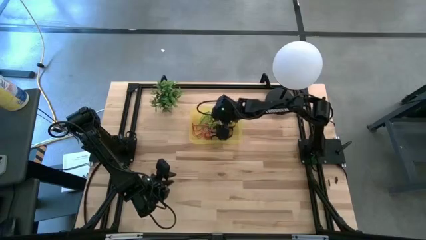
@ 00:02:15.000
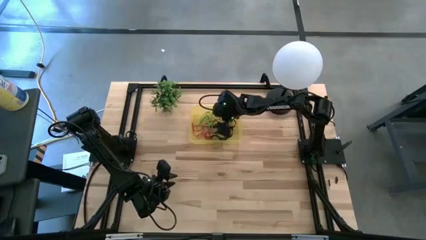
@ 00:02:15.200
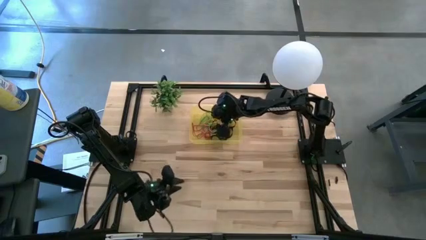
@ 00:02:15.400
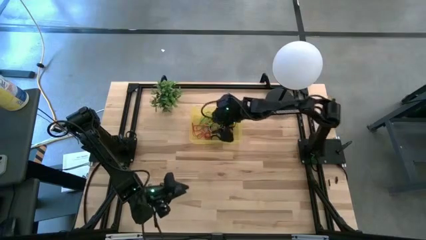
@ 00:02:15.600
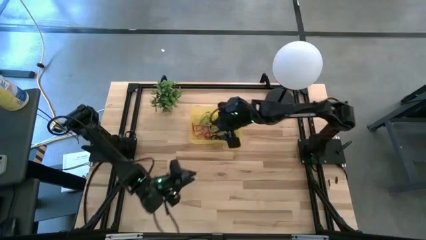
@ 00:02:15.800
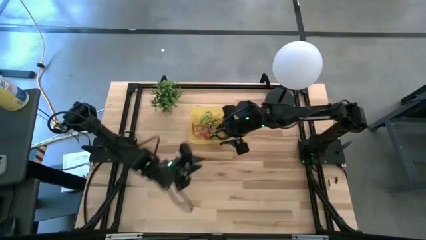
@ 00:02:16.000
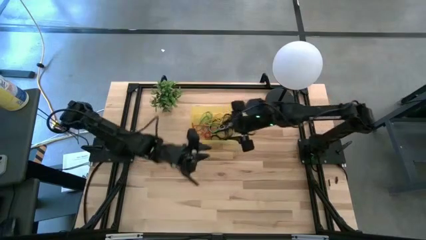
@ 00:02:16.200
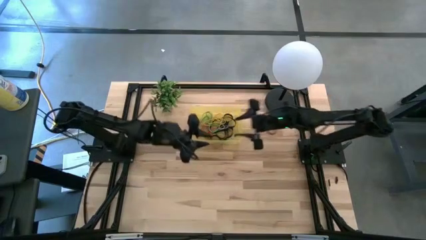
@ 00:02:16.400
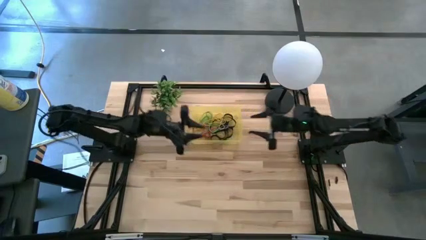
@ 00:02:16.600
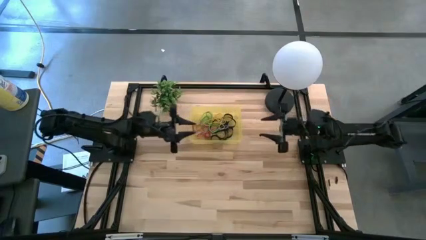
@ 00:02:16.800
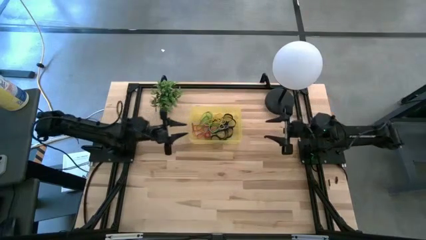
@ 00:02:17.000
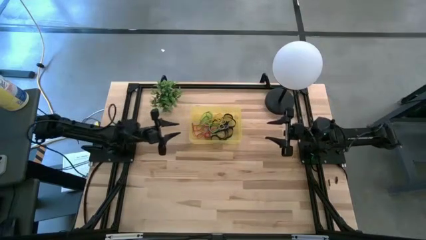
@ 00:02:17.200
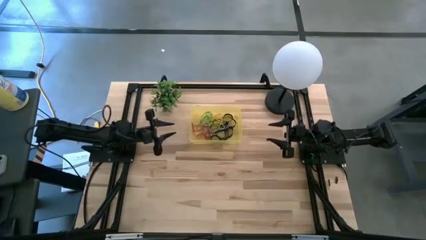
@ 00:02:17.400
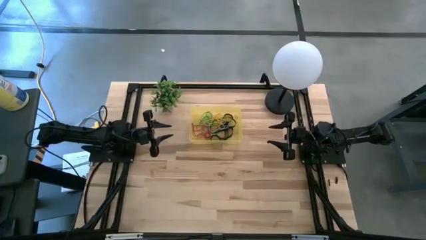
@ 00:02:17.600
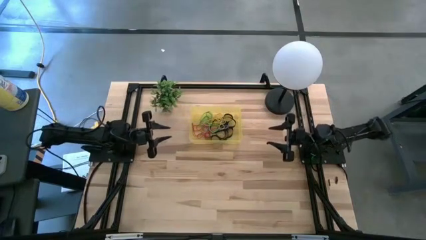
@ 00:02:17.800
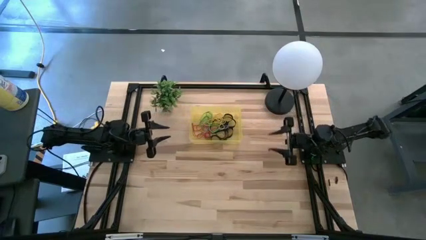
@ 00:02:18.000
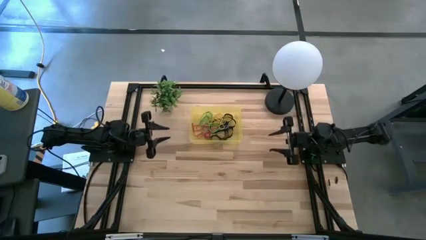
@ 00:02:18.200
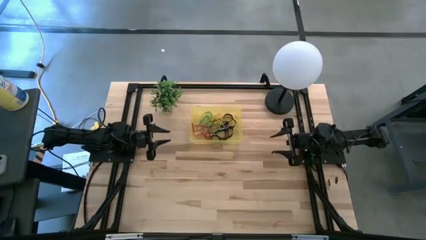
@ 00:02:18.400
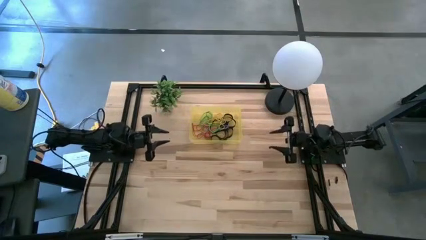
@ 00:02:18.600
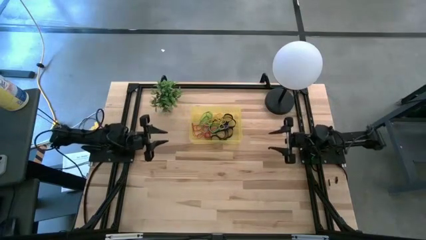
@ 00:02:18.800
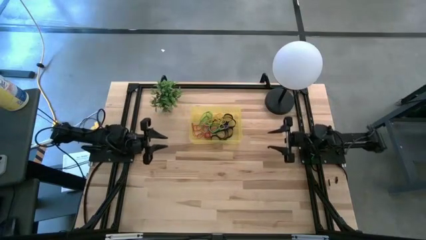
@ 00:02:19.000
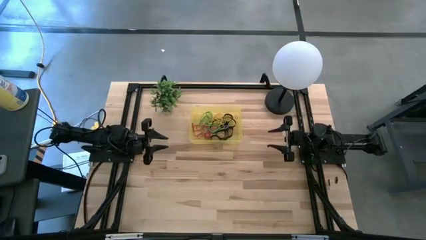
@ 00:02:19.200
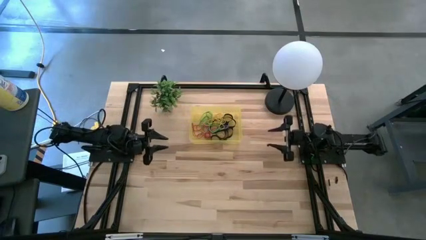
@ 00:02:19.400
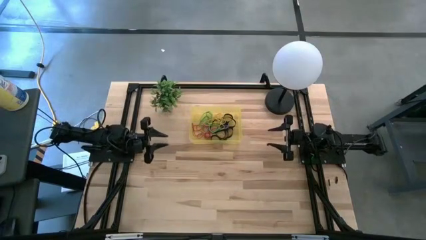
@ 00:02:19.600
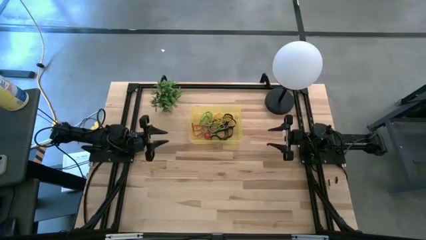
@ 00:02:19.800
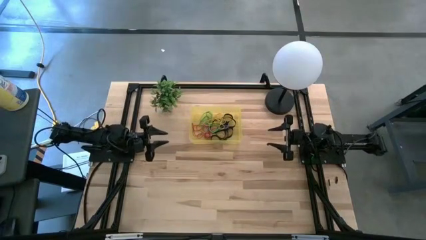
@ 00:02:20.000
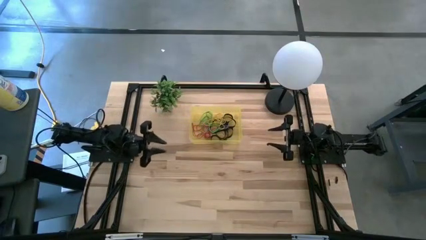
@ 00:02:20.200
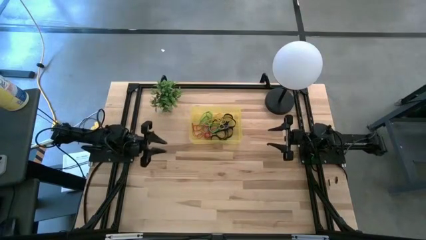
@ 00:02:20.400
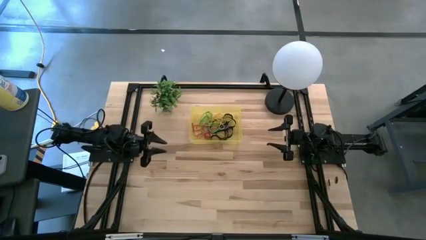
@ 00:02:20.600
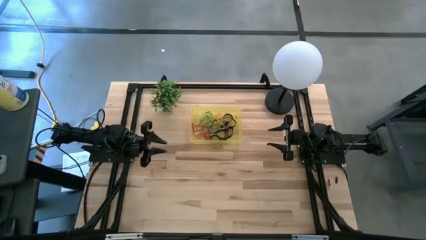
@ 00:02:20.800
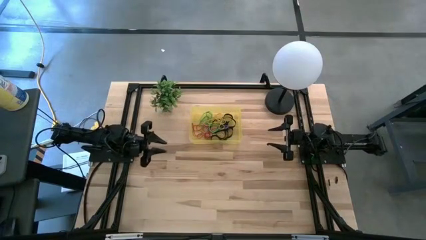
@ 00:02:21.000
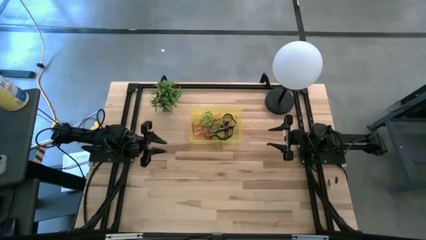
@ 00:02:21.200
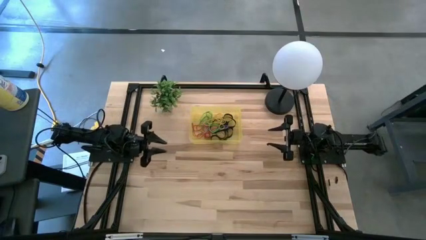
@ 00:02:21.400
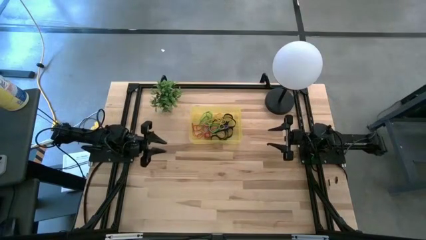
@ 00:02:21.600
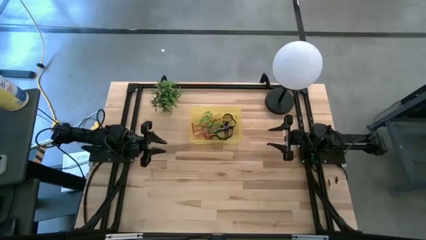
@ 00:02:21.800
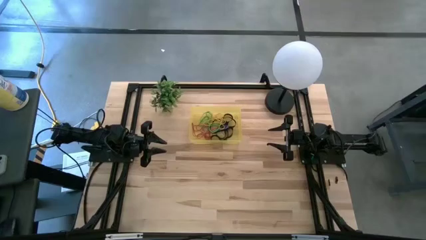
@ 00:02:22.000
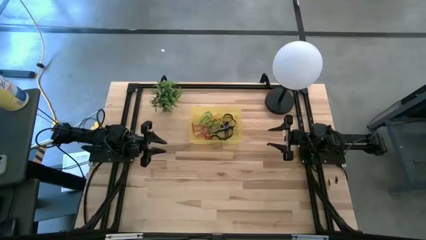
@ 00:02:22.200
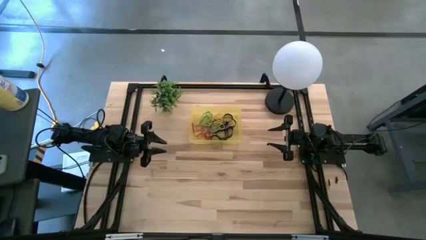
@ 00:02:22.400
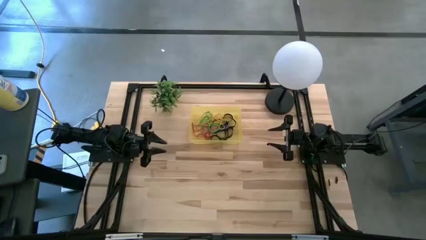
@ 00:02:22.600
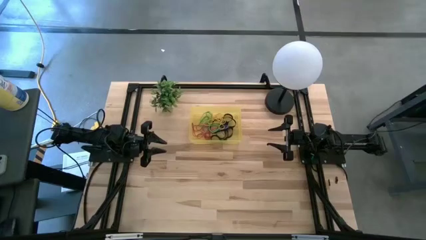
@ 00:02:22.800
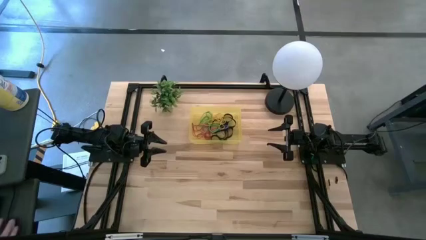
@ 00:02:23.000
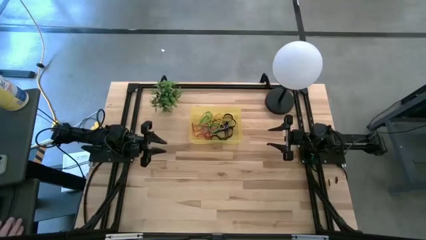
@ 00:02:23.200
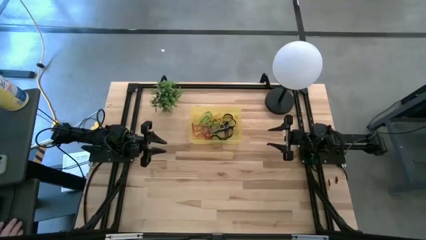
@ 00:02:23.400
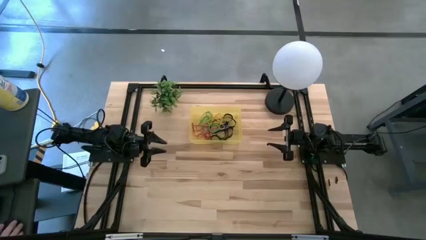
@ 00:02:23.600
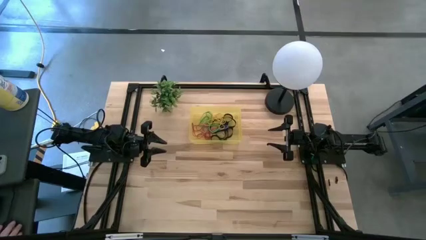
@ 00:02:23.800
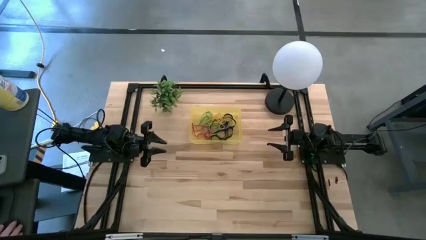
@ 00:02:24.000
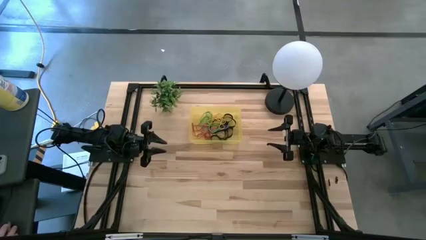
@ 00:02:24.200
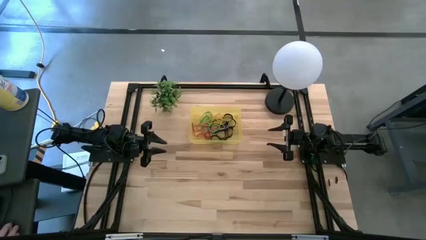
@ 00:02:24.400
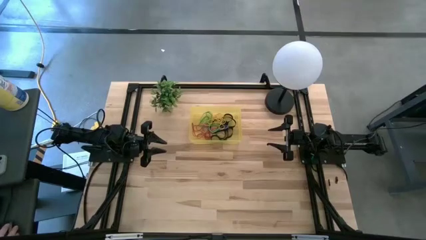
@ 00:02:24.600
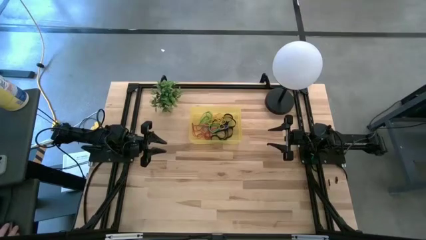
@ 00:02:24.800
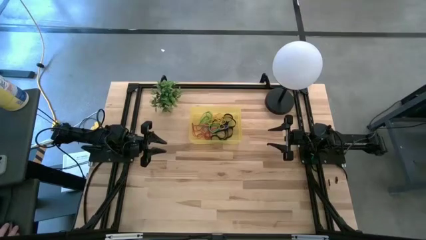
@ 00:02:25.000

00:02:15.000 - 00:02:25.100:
Task: Pick and place rubber bands into bin
Return to Home Position

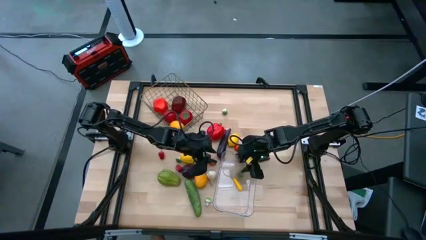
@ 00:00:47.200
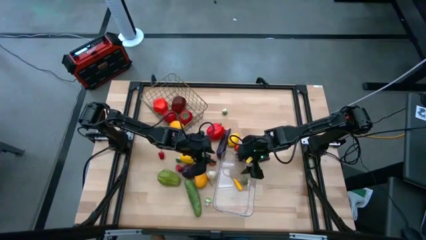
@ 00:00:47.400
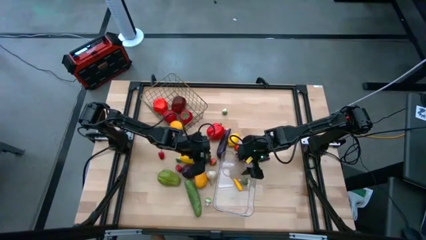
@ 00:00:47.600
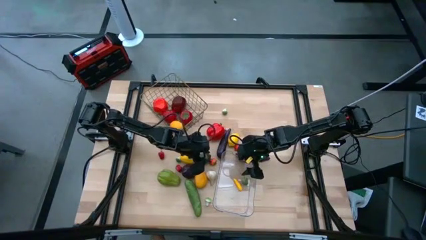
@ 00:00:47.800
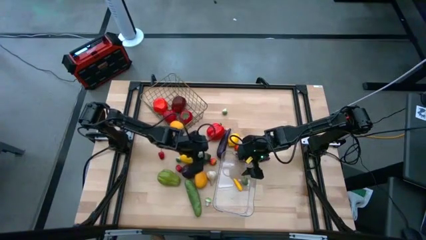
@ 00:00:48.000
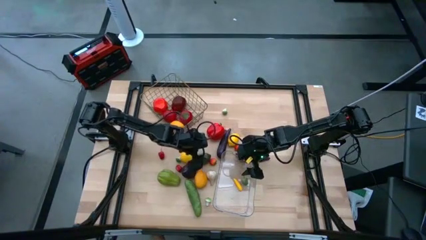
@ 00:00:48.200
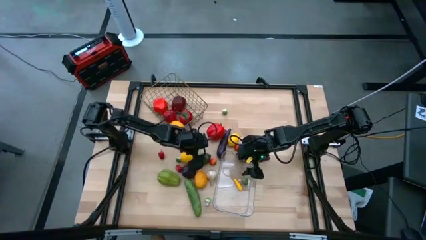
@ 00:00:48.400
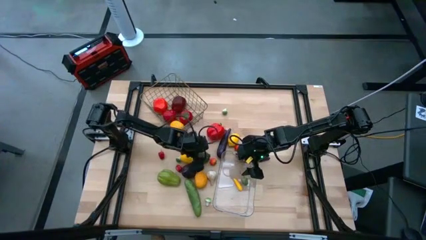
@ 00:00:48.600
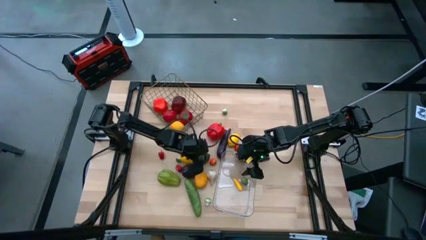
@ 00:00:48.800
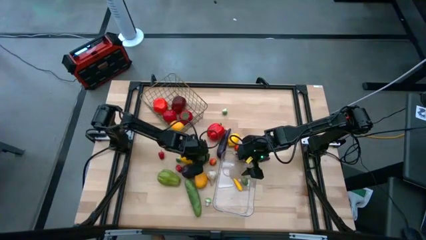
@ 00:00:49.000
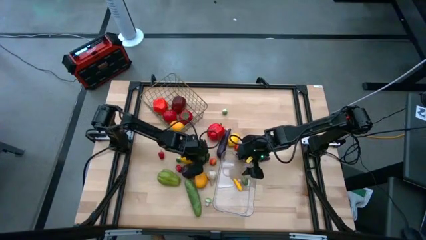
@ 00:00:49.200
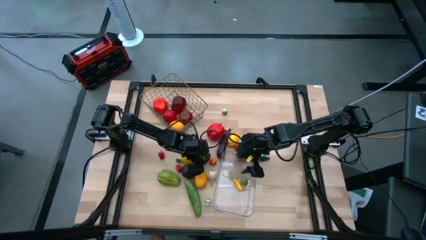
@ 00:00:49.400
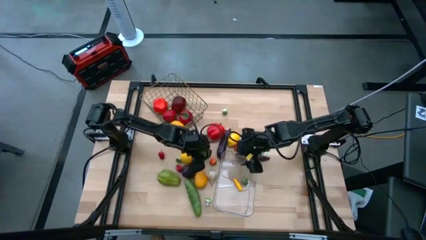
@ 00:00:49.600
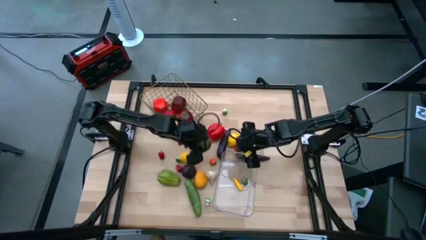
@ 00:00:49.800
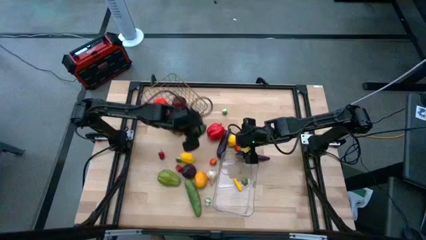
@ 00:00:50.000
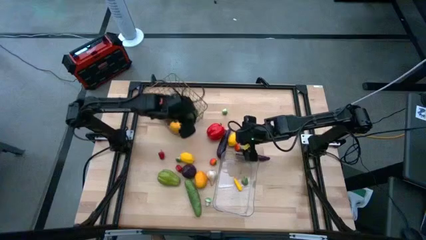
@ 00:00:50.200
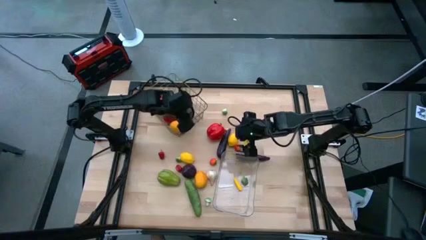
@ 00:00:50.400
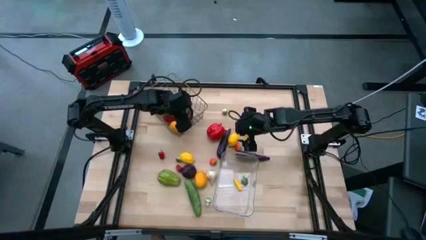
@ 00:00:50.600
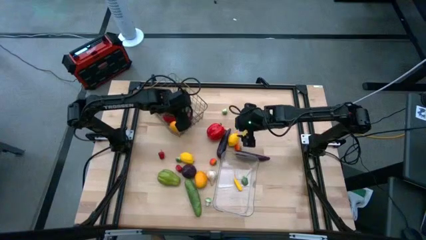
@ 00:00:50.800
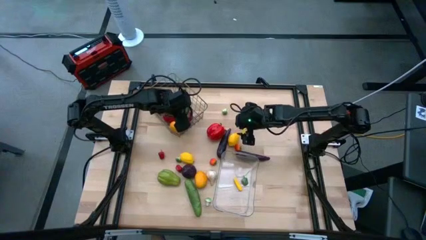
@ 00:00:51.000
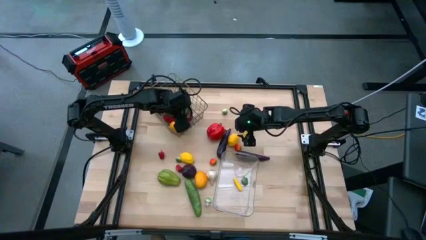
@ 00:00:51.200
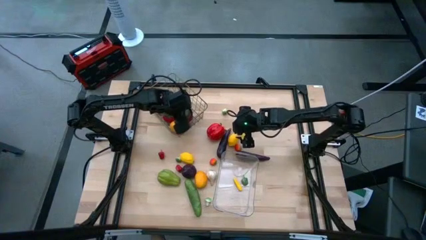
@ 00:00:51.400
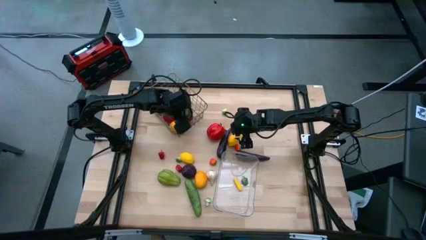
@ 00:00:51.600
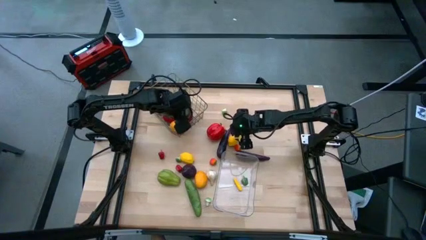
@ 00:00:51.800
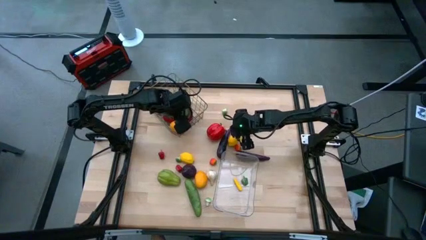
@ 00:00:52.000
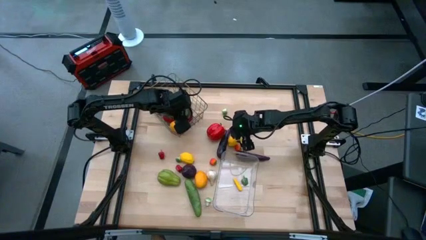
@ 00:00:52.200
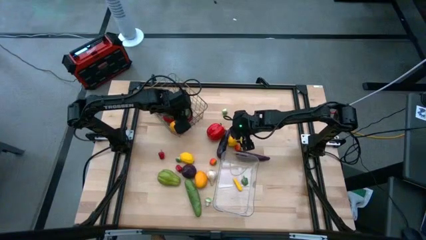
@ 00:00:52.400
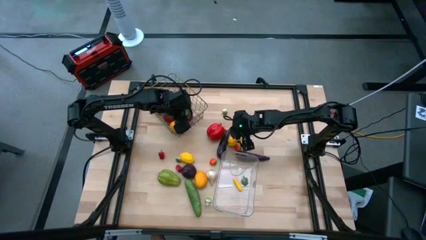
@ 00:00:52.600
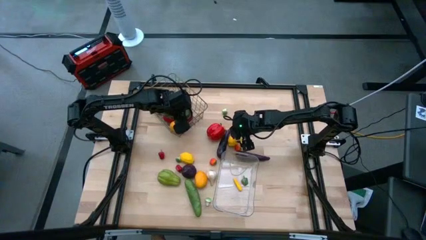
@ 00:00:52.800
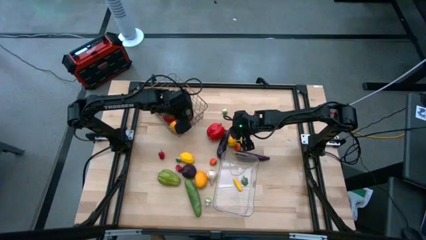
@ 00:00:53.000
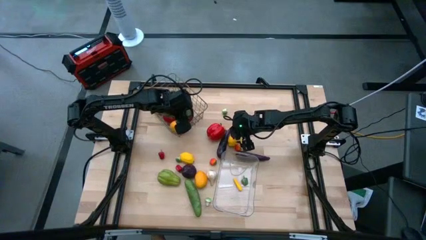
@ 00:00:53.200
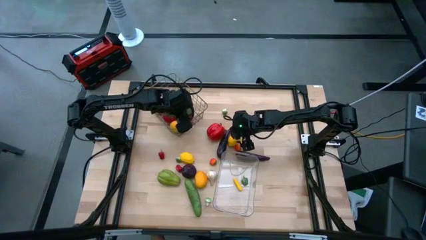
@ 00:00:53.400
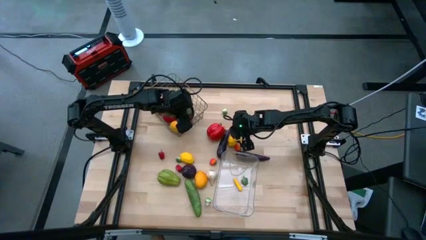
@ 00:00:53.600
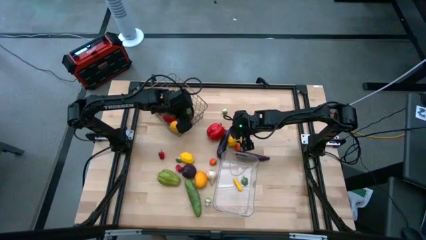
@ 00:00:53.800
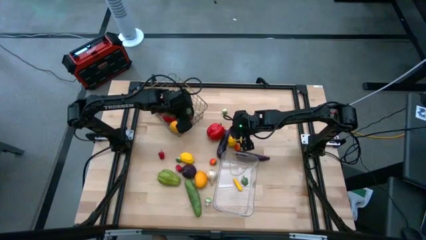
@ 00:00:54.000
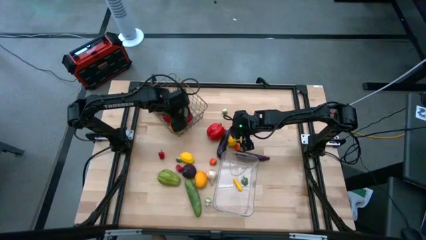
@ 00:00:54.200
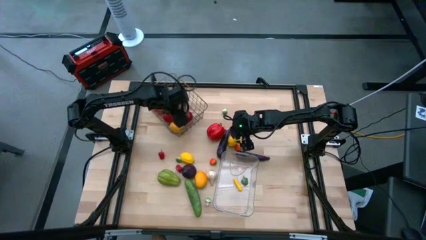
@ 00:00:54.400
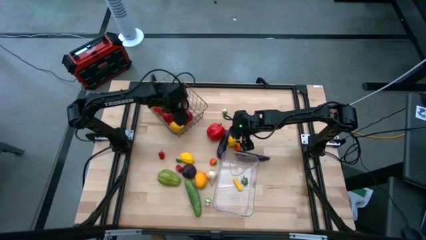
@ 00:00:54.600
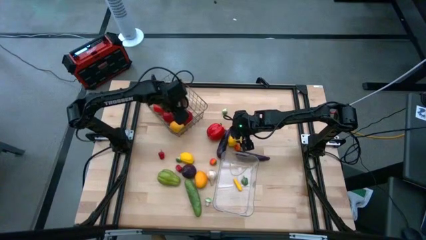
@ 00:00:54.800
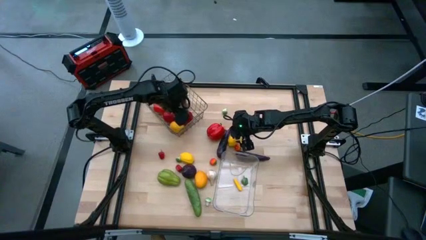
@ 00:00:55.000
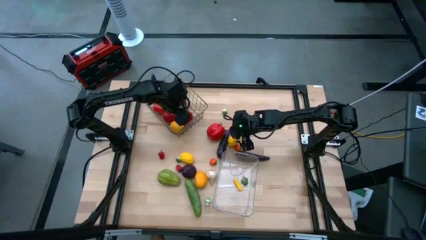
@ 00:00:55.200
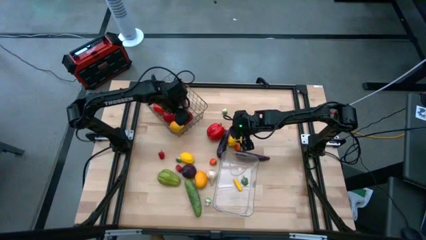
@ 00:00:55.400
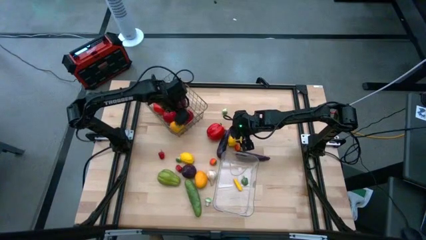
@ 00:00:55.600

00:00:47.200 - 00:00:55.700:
Task: Sort produce into baskets
Put the green lime into the wire basket
